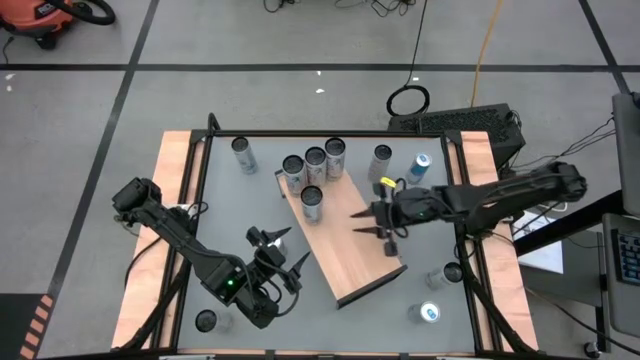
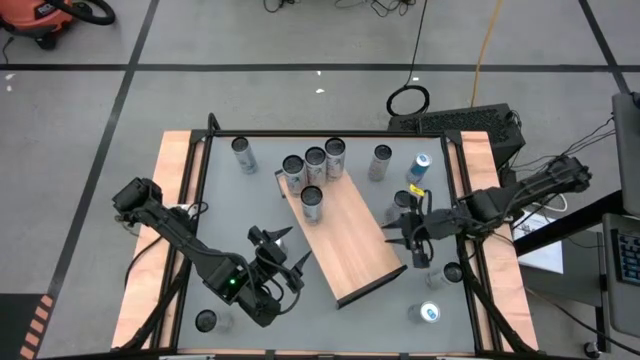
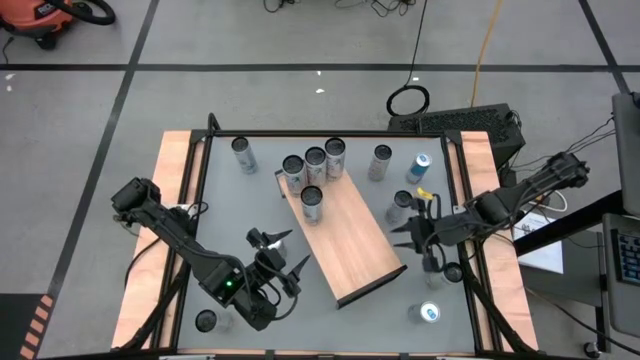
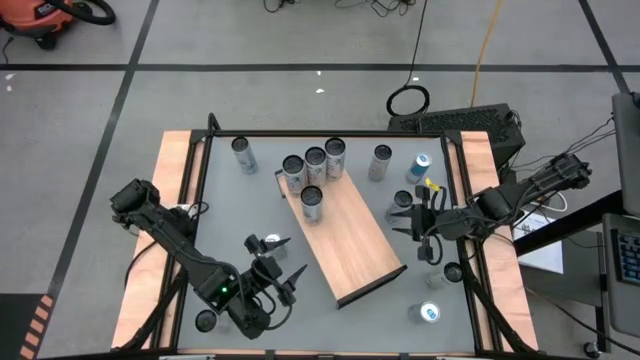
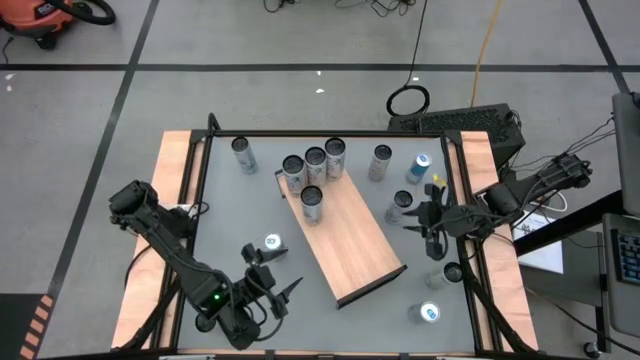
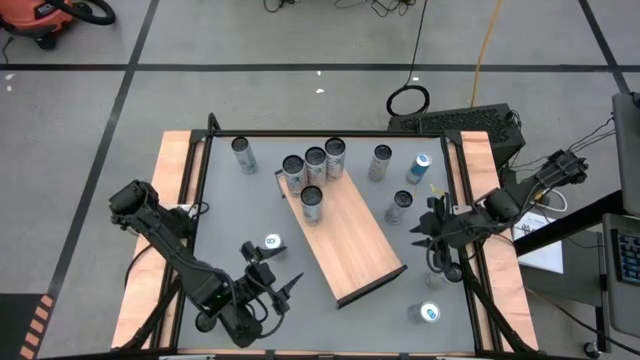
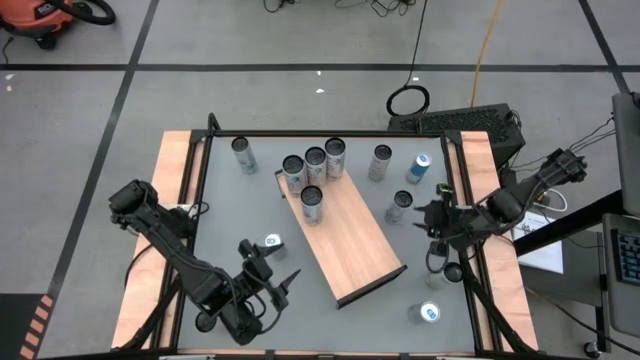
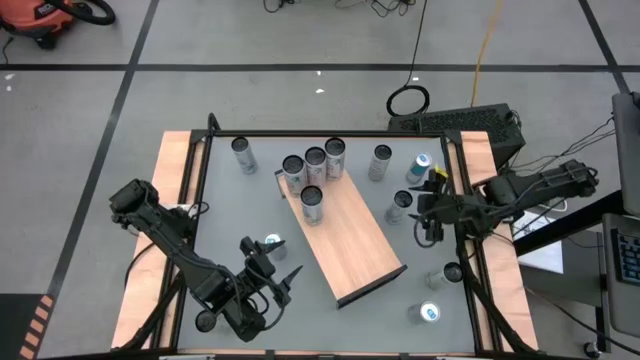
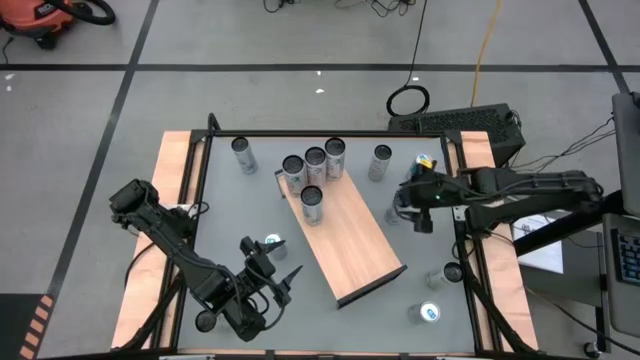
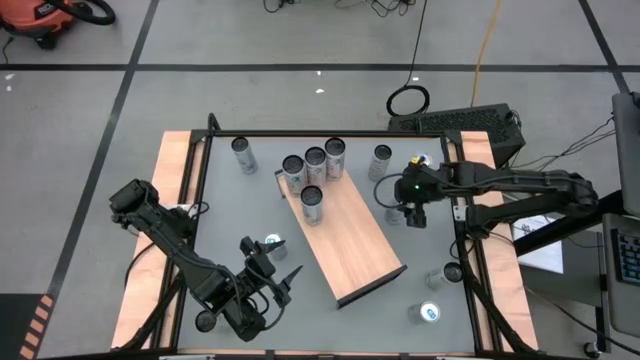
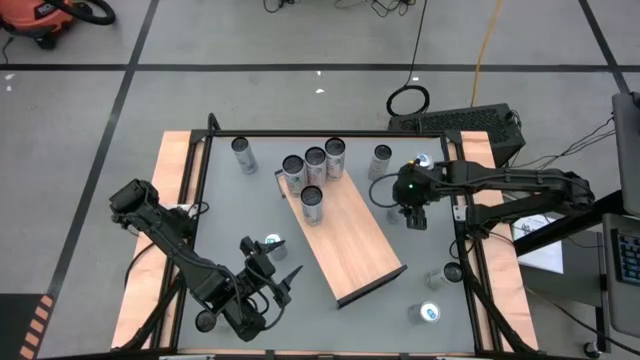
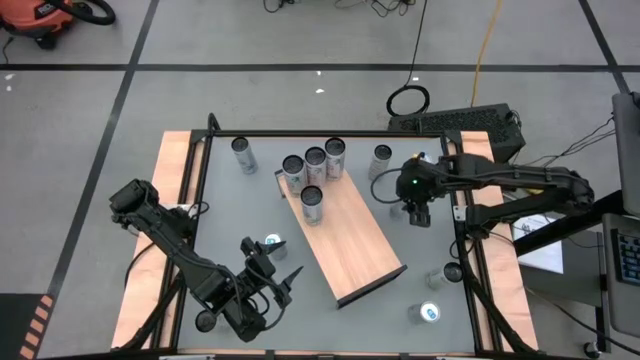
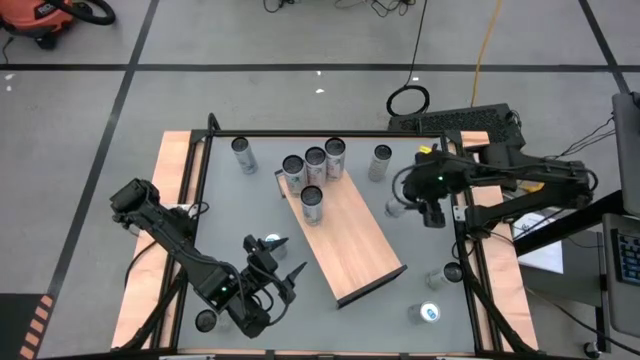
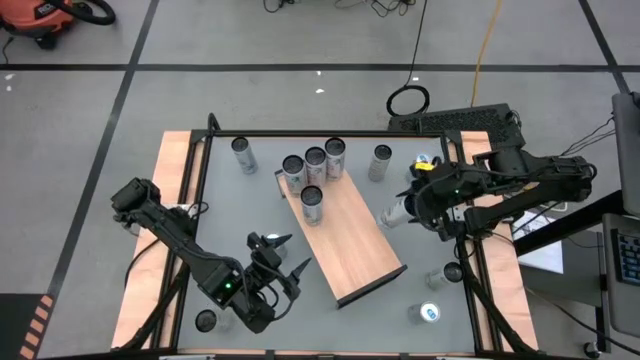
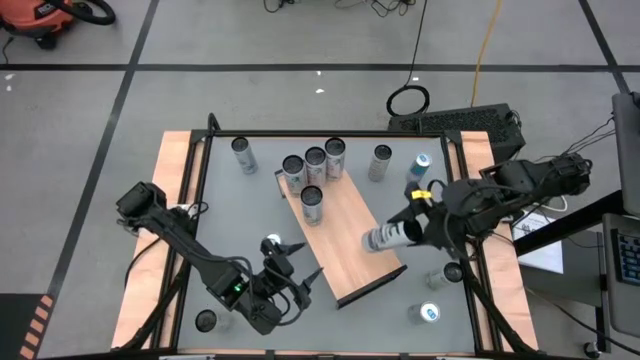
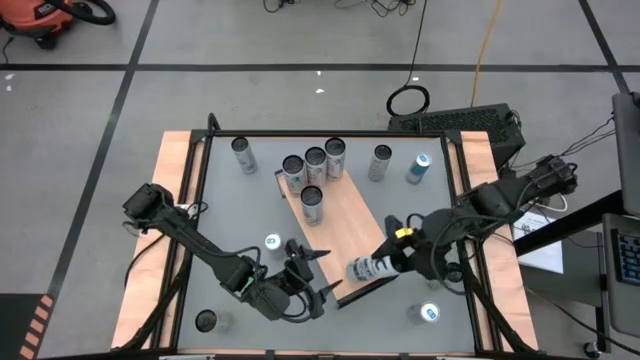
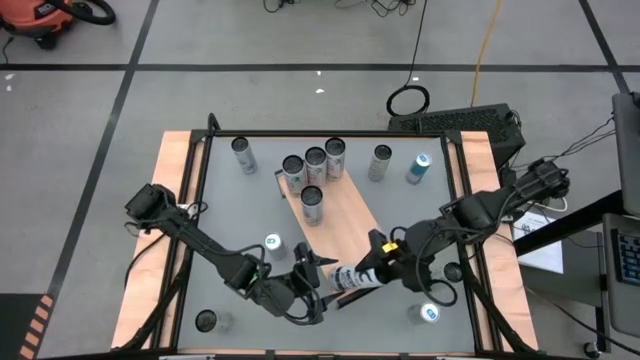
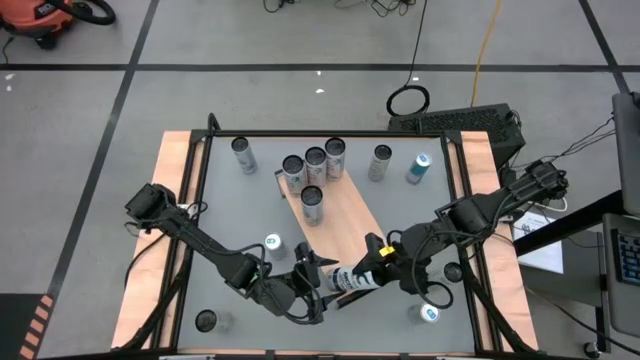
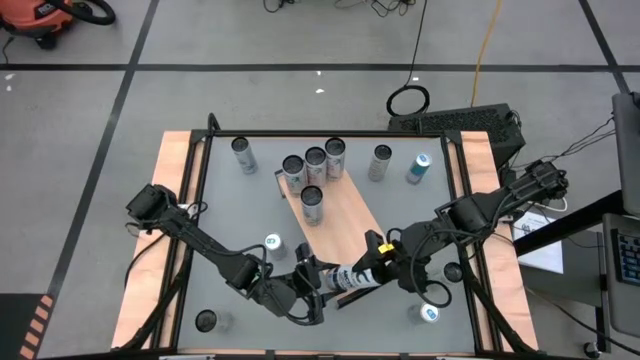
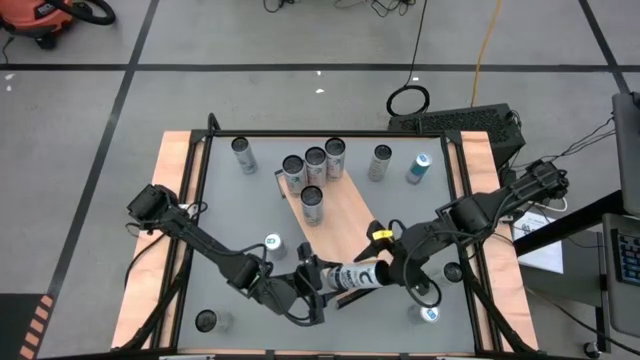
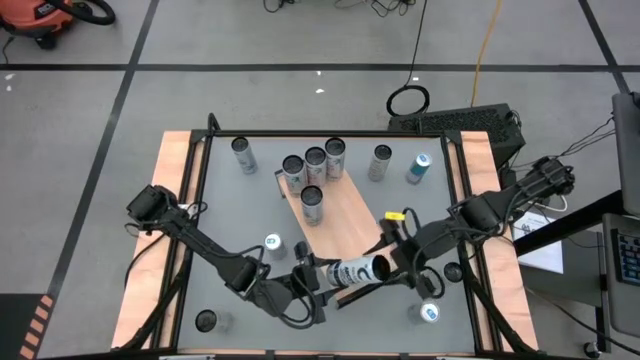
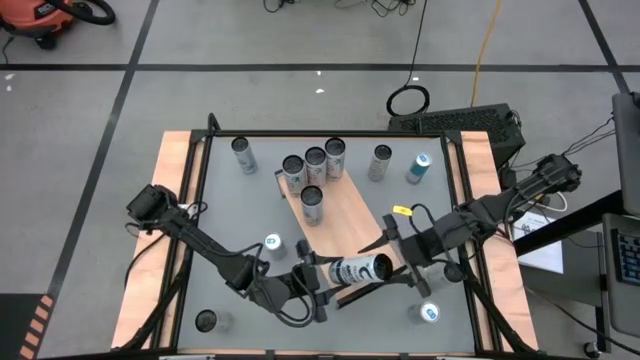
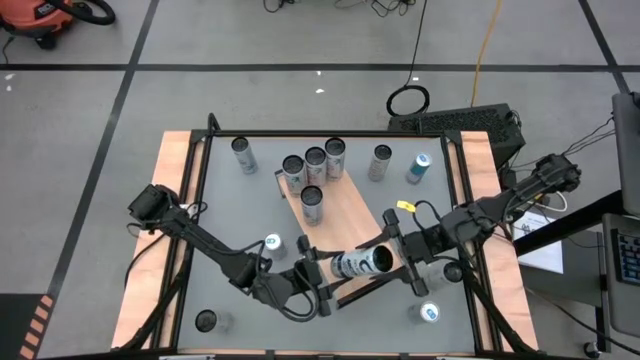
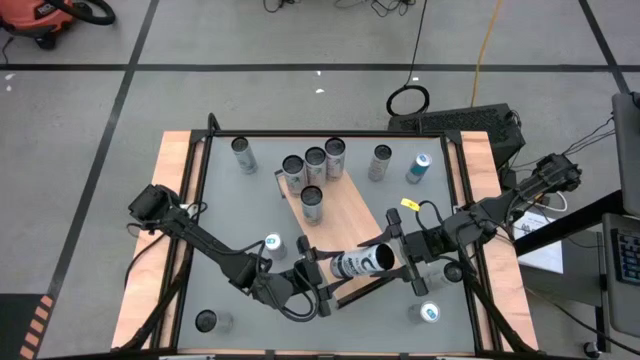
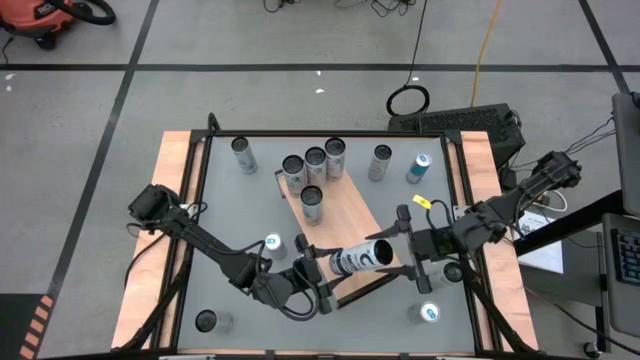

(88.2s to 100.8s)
Task: Place canned beverage on shelf
Put the right white-blue soda can on the shelf aligned with the other white-blue soda can
